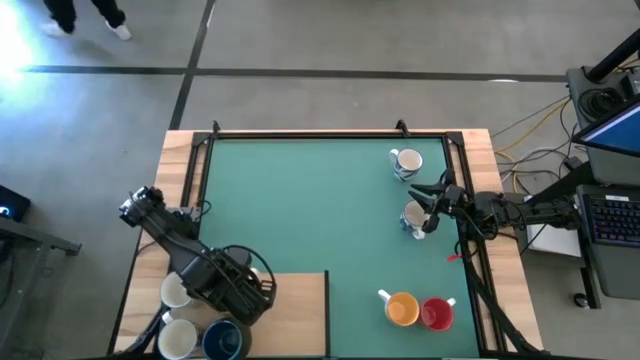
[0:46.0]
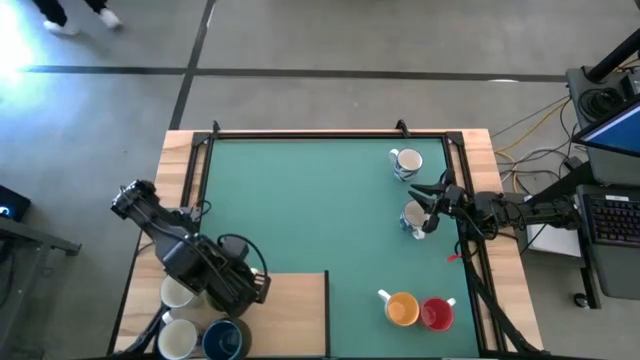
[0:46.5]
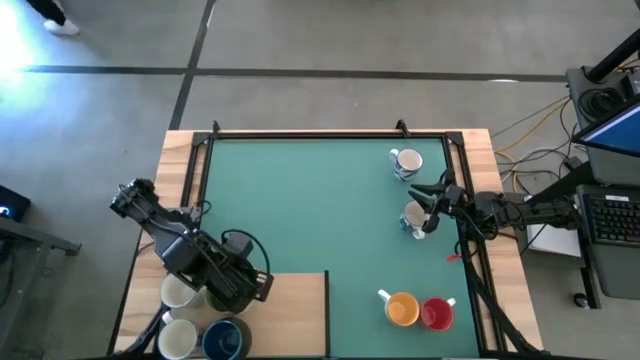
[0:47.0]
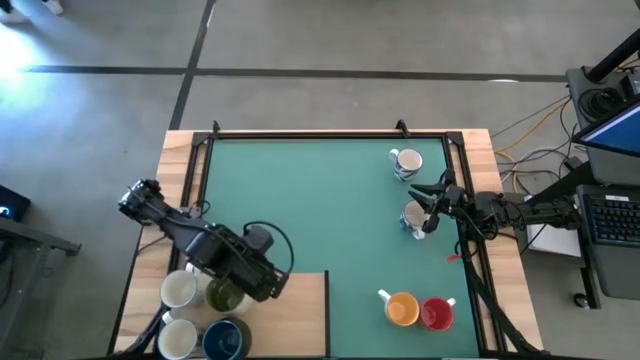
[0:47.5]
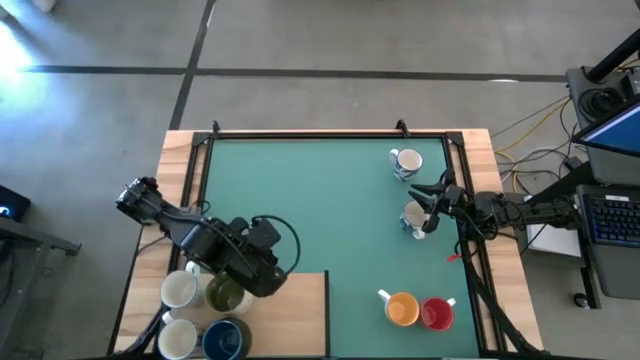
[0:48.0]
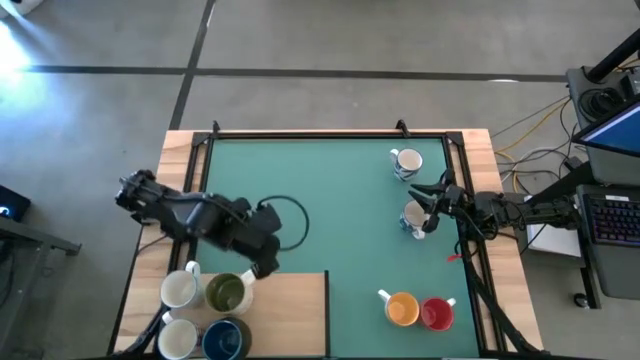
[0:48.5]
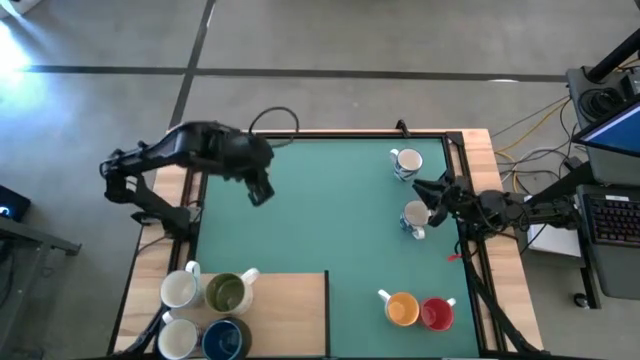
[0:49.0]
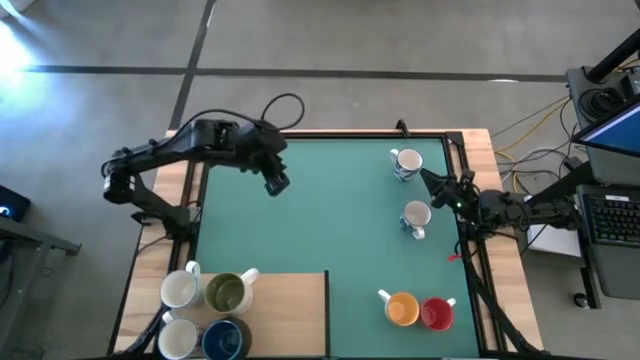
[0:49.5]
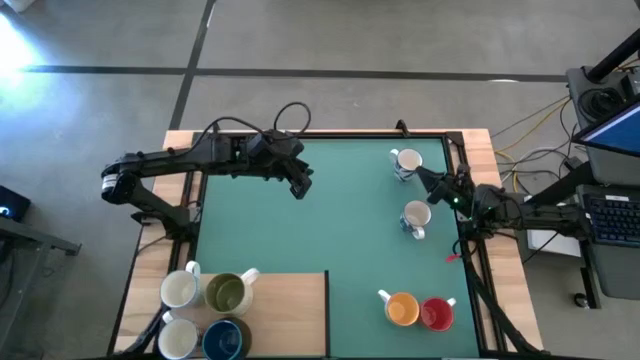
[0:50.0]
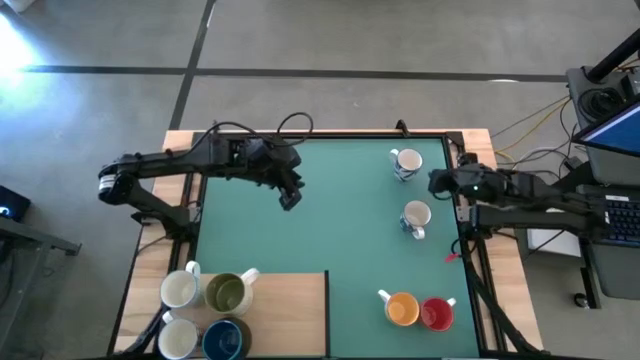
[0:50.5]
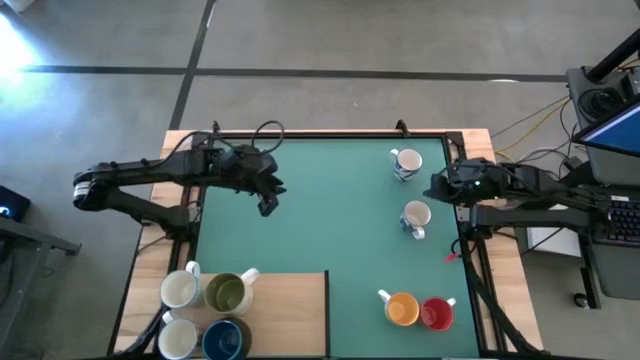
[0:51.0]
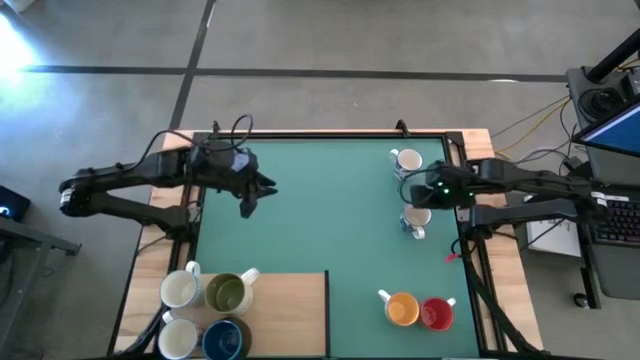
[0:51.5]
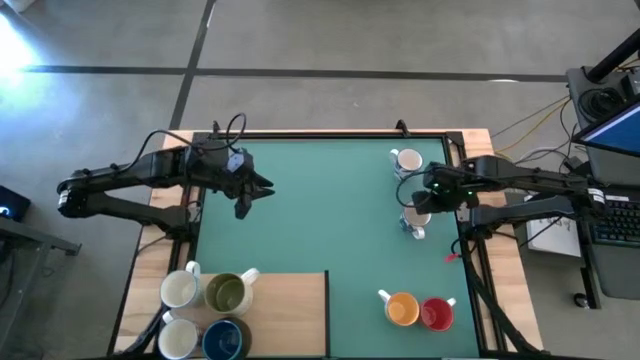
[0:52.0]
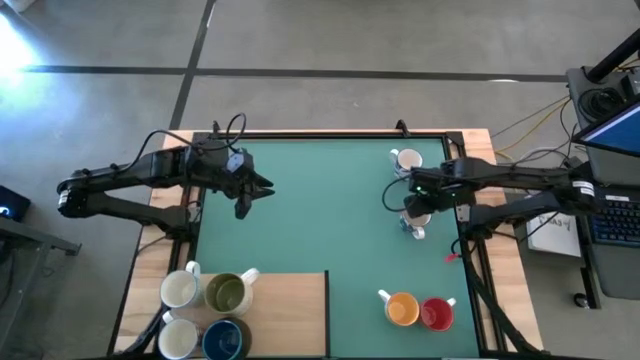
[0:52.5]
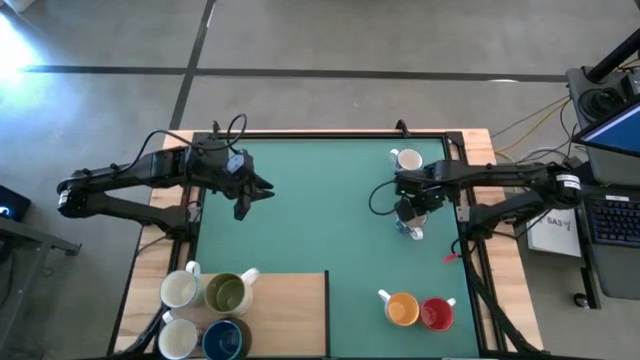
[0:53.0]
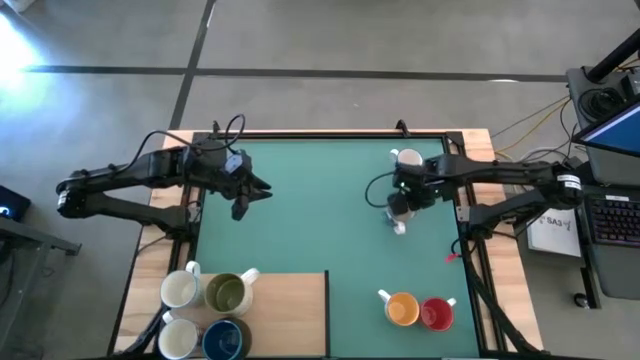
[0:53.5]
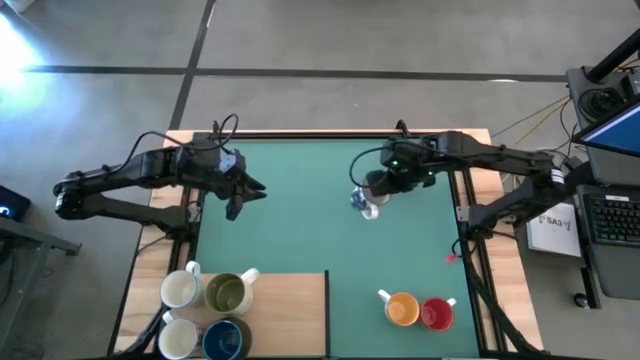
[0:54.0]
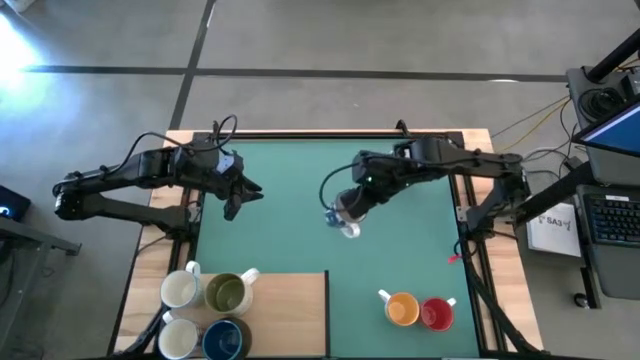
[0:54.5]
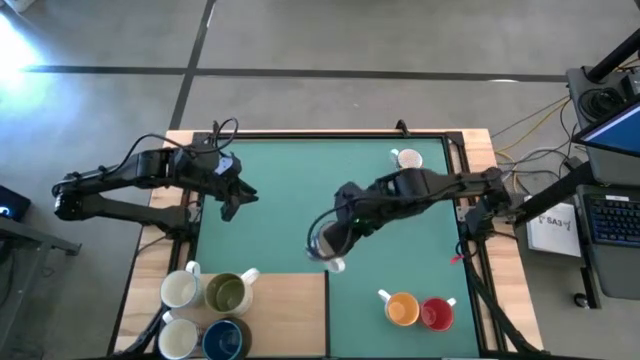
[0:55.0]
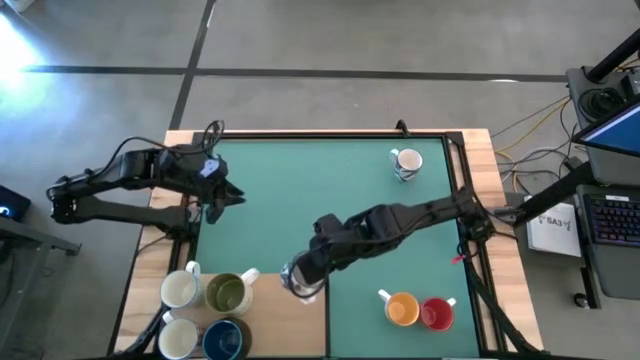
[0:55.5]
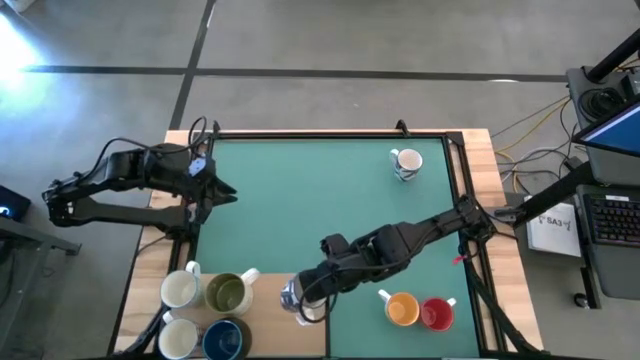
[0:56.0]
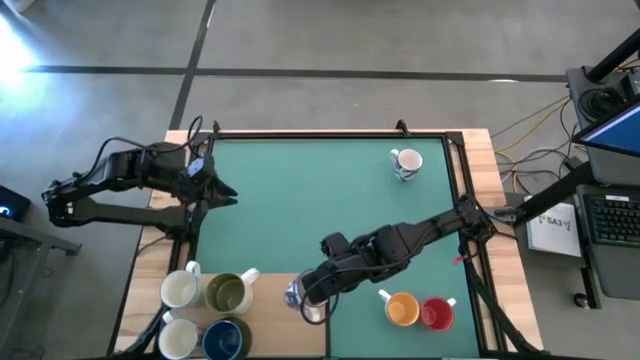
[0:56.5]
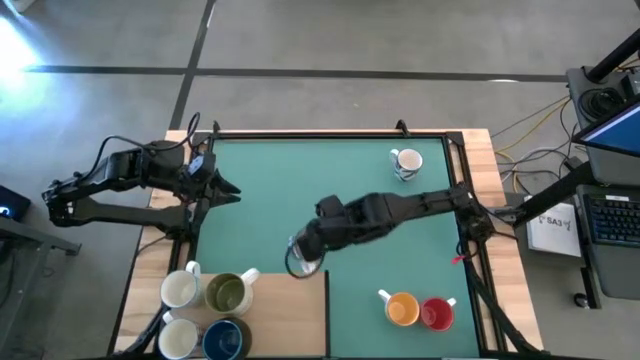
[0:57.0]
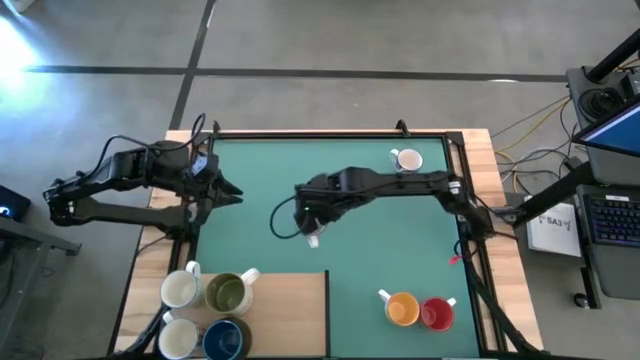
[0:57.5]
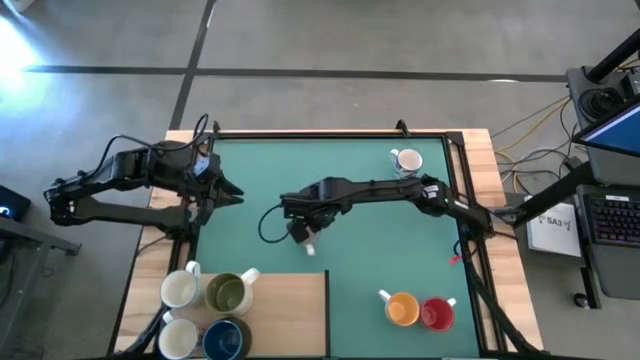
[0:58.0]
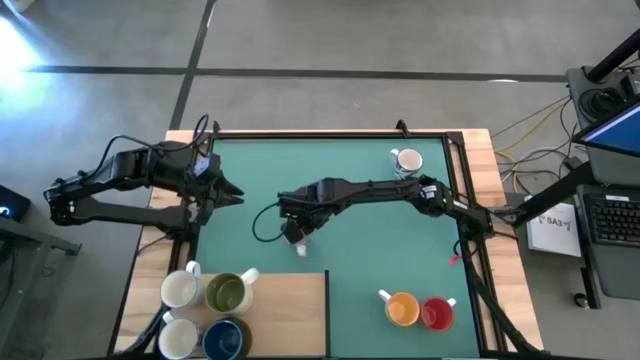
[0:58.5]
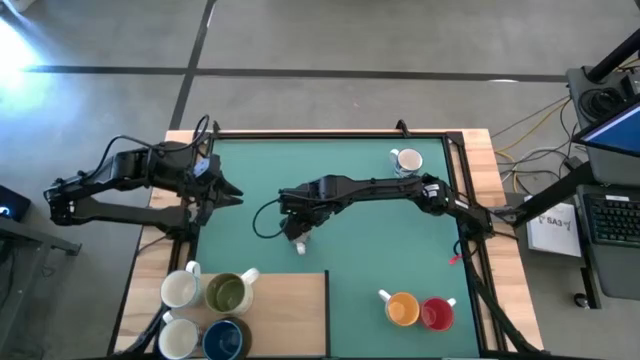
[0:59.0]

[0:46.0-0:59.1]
Task: Place coffee mugs
Move the bottom blue patterned mug to the center of the table

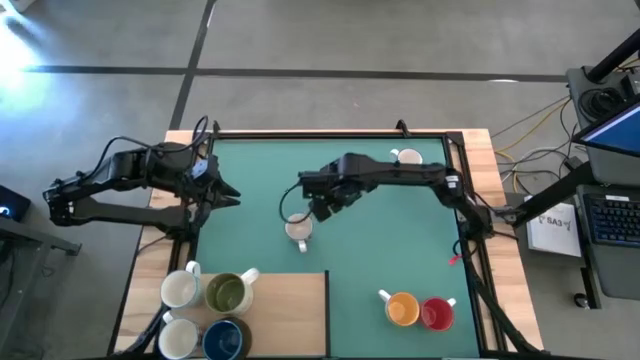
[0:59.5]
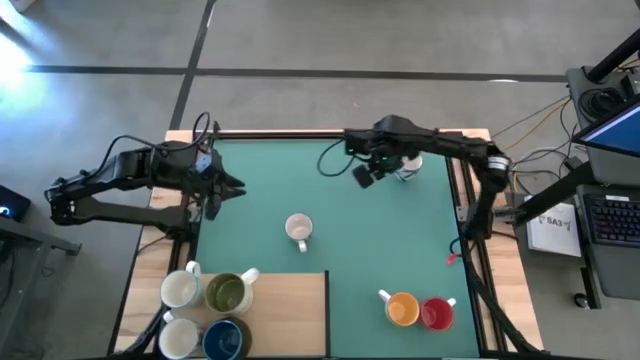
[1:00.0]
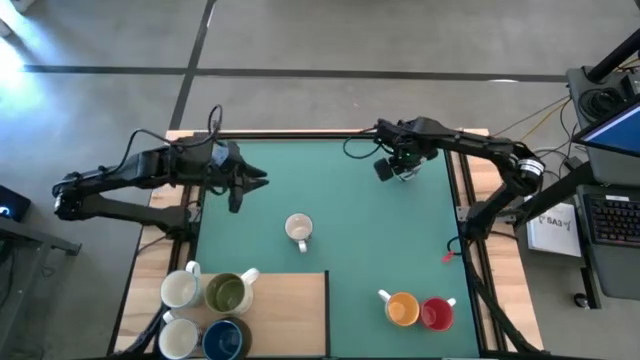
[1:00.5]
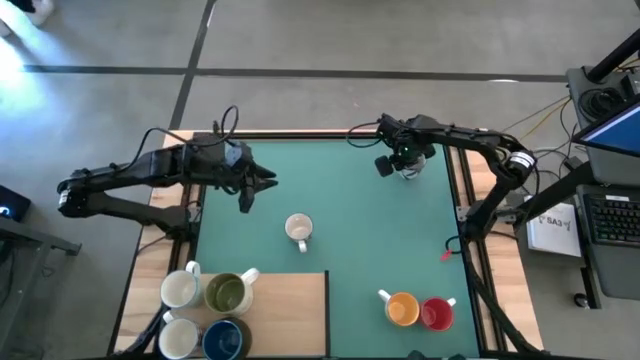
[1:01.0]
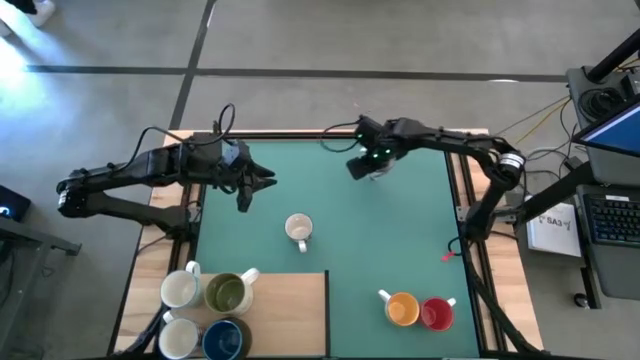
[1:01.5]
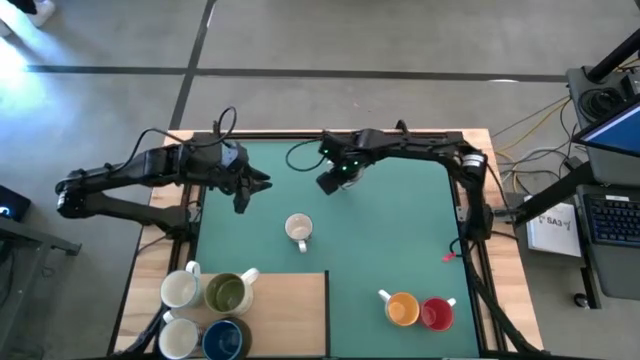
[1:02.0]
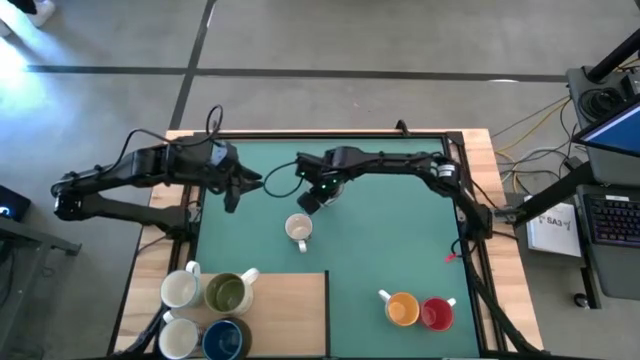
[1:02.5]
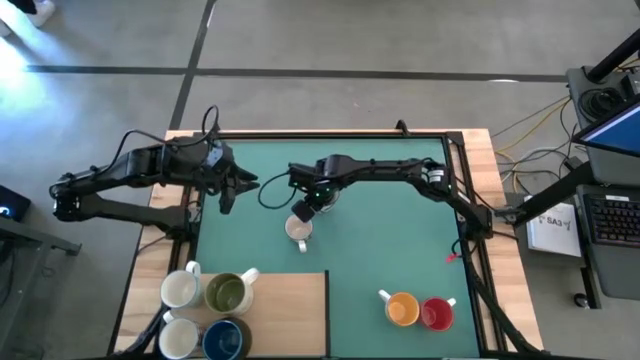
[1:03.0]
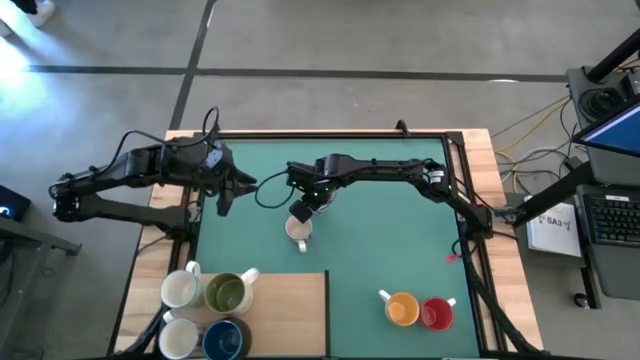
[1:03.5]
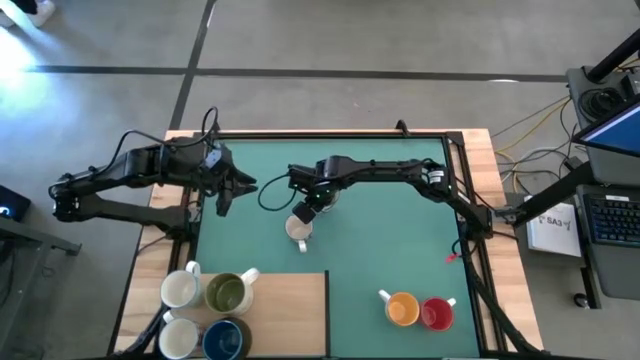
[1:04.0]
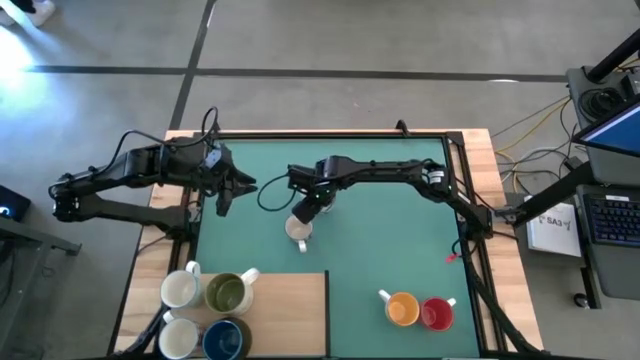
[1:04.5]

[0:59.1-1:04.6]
Move the top blue patterned mug to the center of the table
